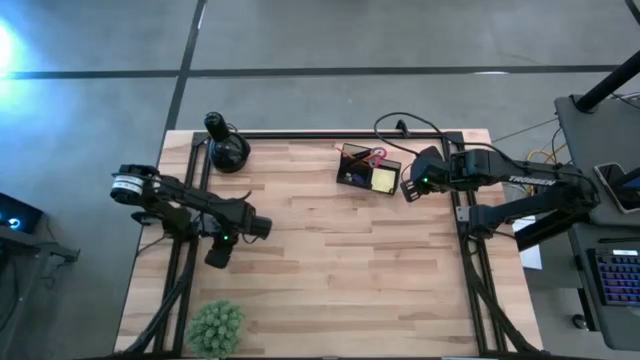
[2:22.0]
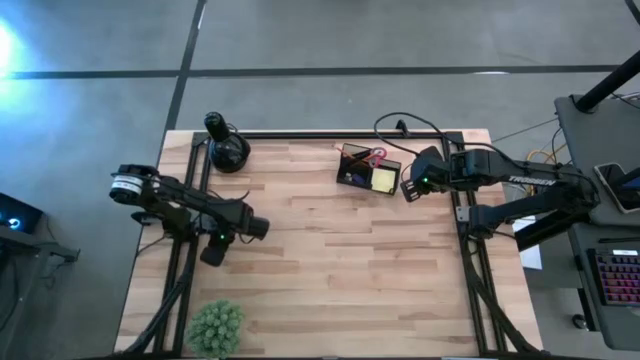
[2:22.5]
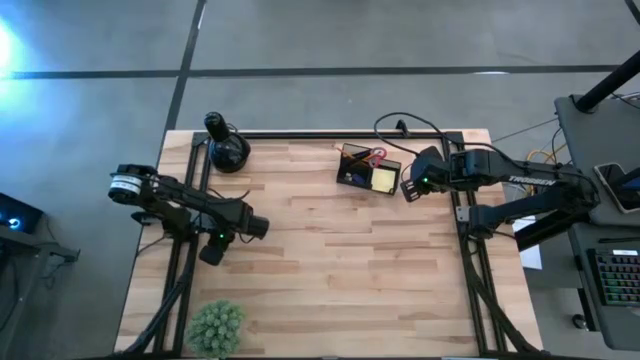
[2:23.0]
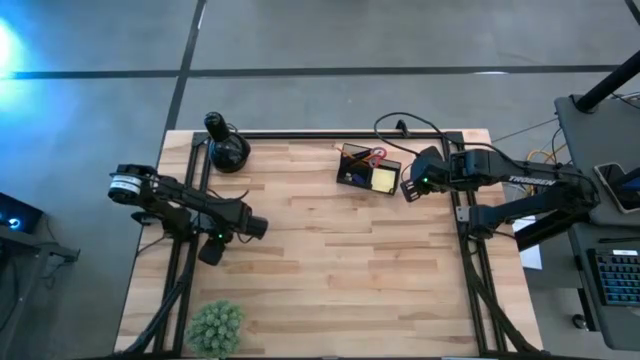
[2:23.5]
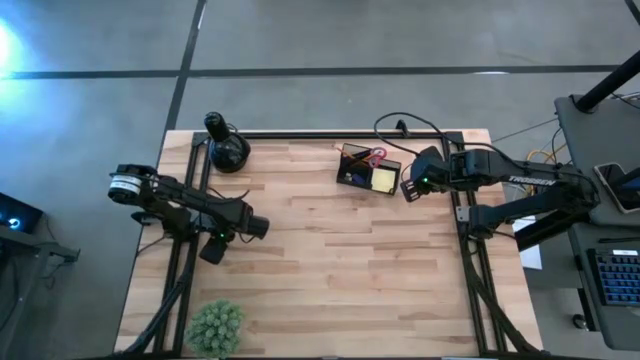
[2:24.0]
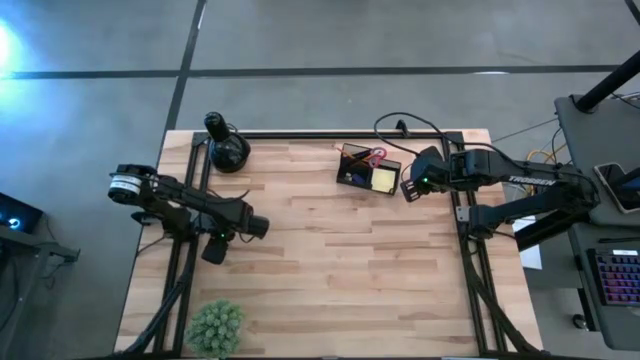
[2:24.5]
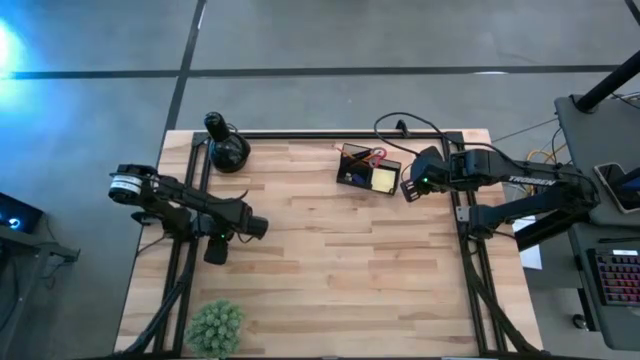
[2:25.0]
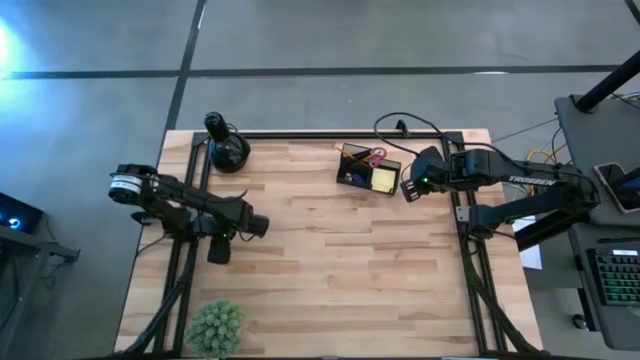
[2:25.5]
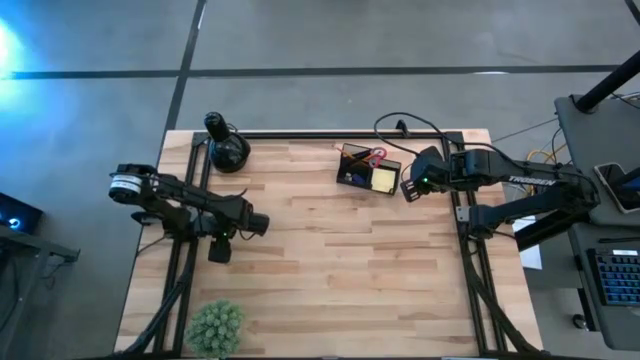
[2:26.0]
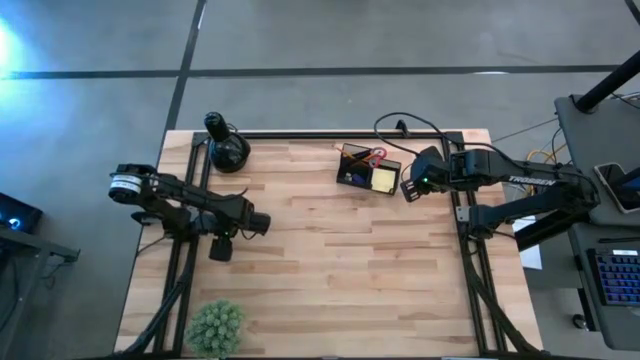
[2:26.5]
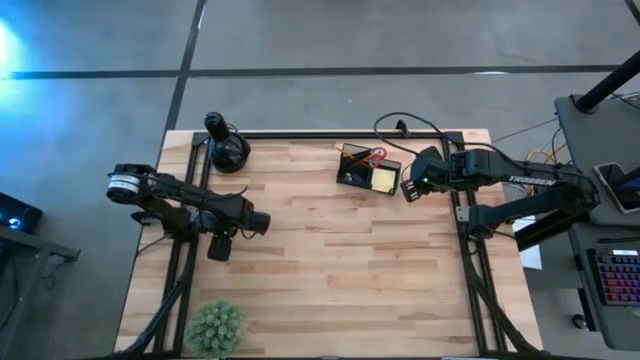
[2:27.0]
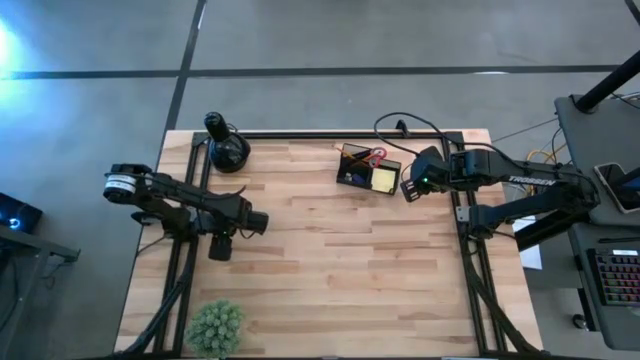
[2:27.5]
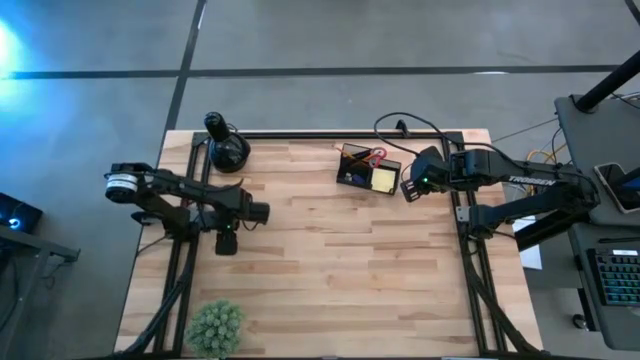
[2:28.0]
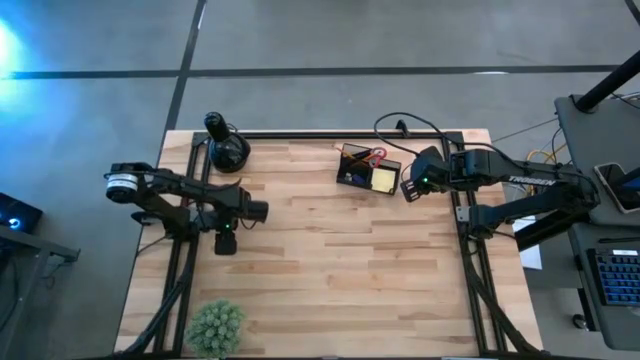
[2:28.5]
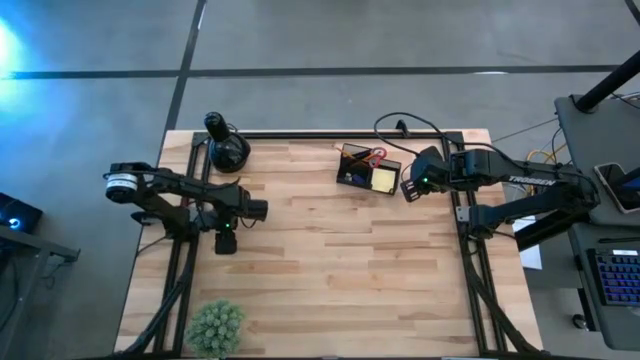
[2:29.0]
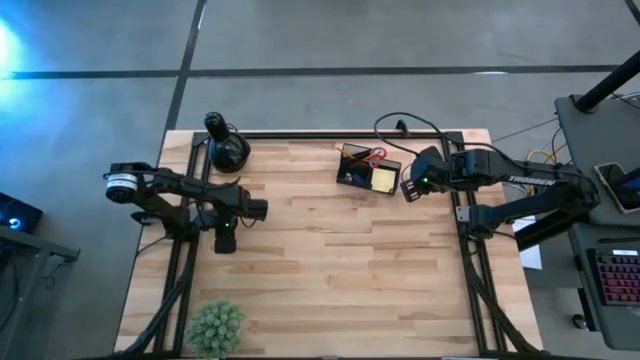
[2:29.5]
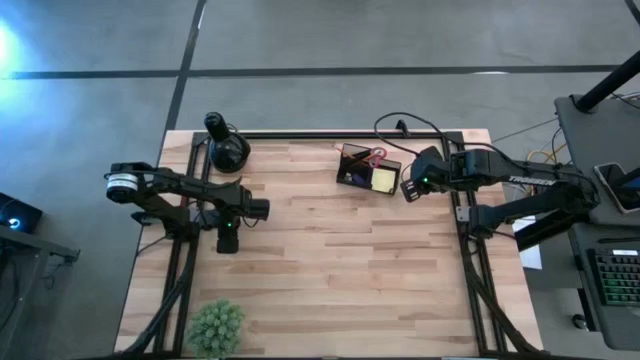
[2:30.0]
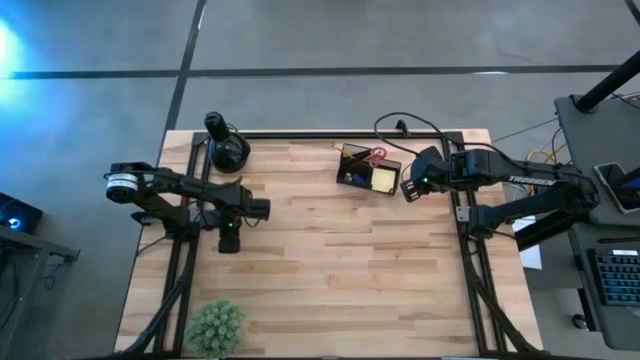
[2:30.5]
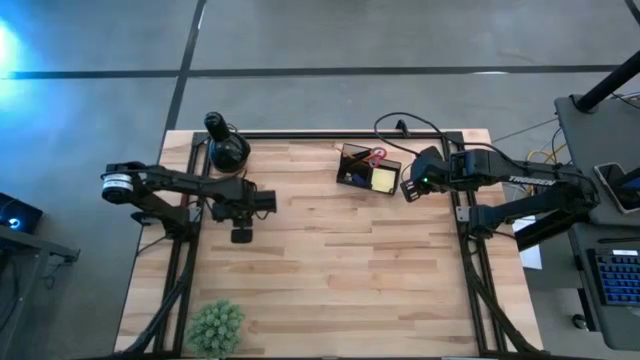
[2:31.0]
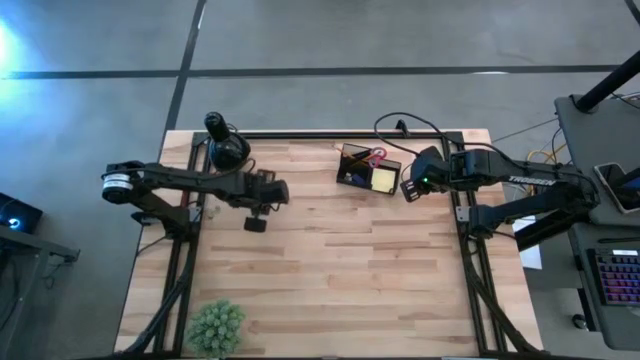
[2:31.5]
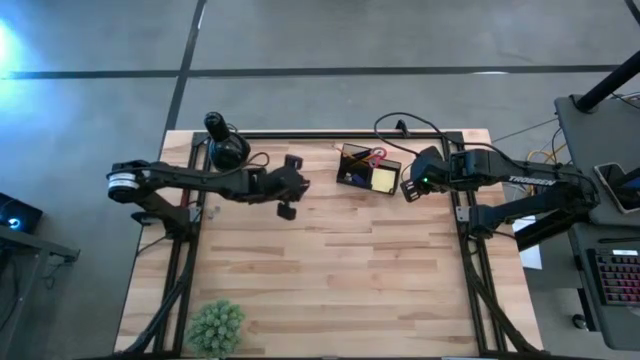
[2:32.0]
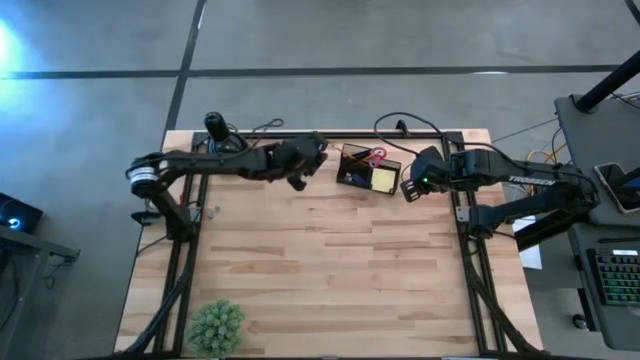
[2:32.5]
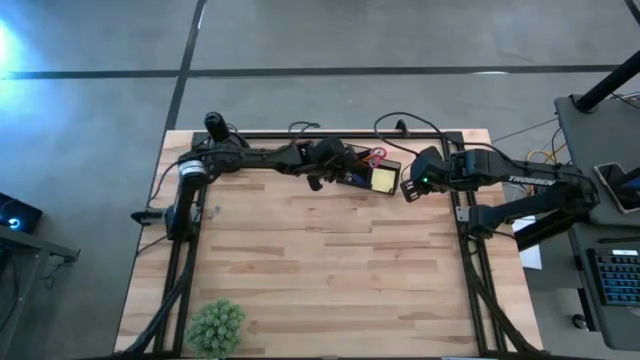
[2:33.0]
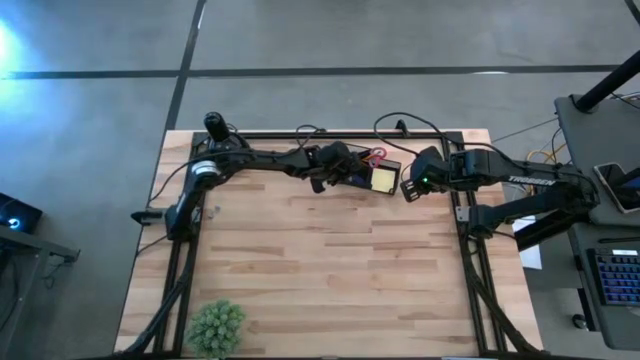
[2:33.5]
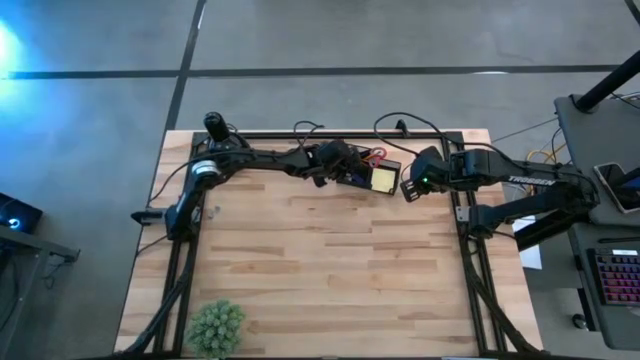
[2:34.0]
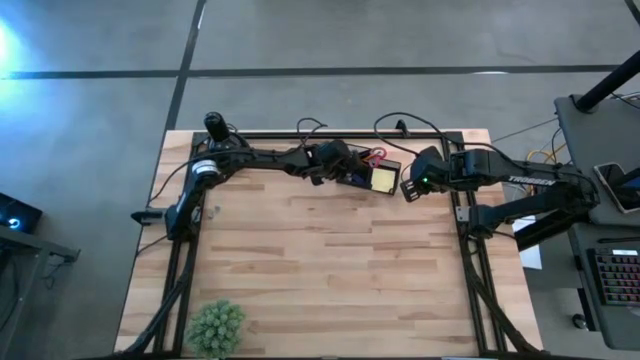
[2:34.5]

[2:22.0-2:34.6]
Task: Pick and place office supplies into organizer
Put the pink binder clip into the desk organizer

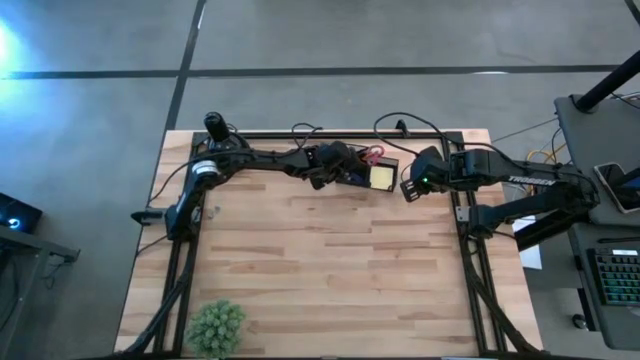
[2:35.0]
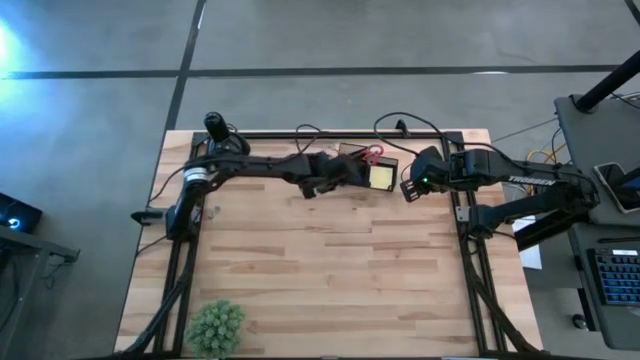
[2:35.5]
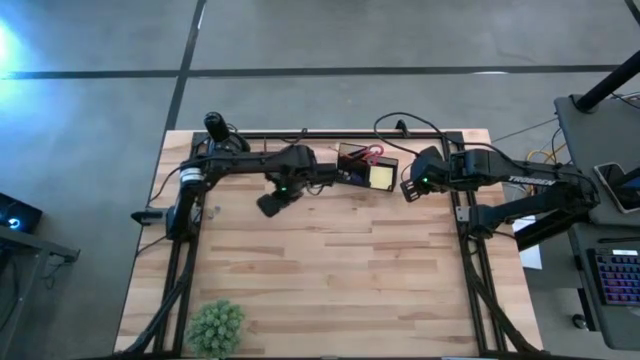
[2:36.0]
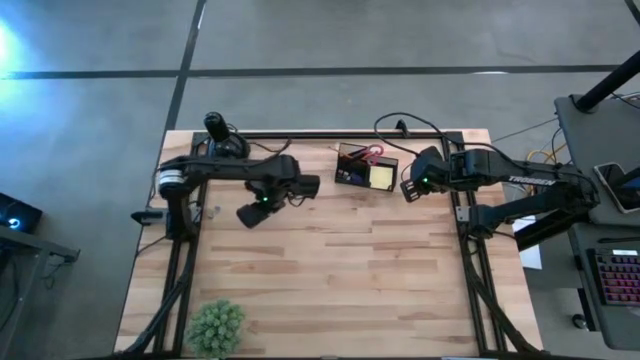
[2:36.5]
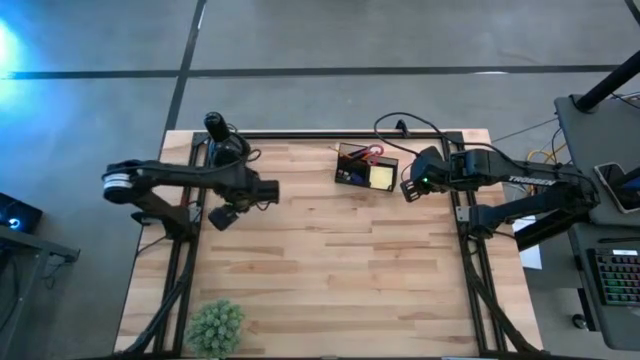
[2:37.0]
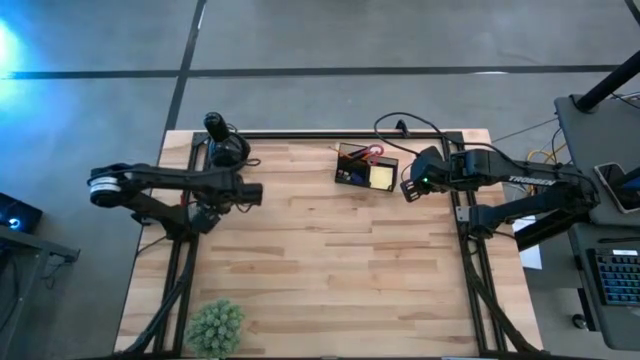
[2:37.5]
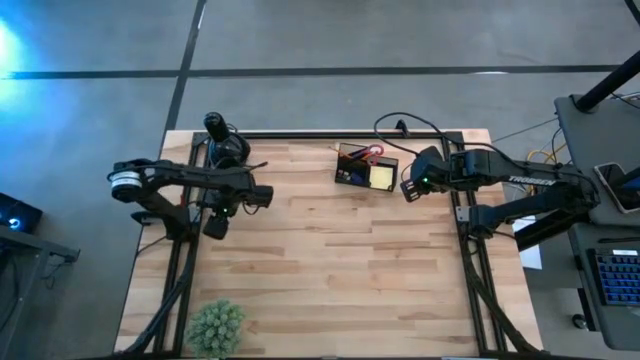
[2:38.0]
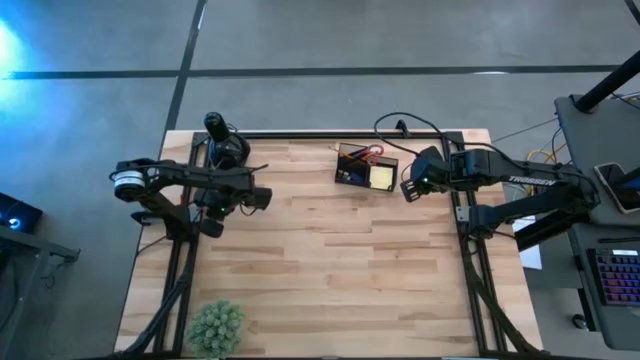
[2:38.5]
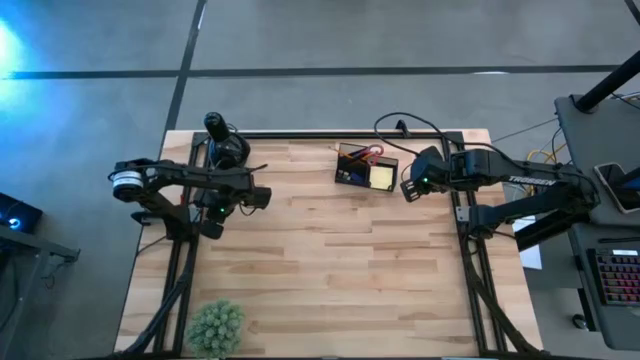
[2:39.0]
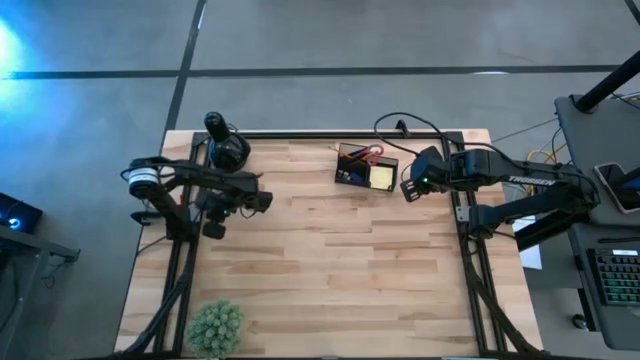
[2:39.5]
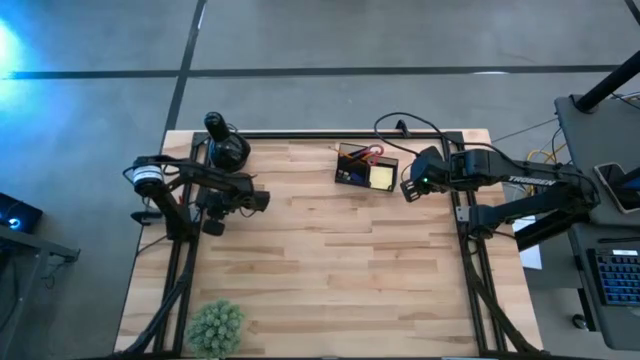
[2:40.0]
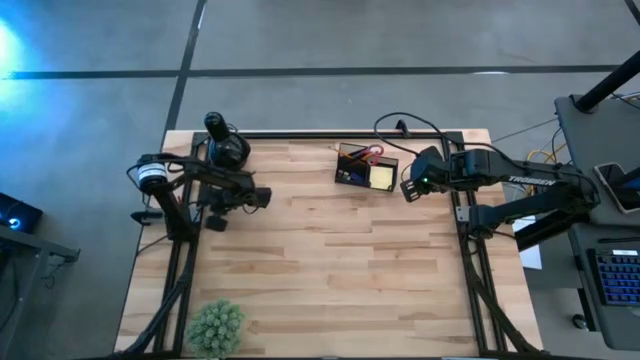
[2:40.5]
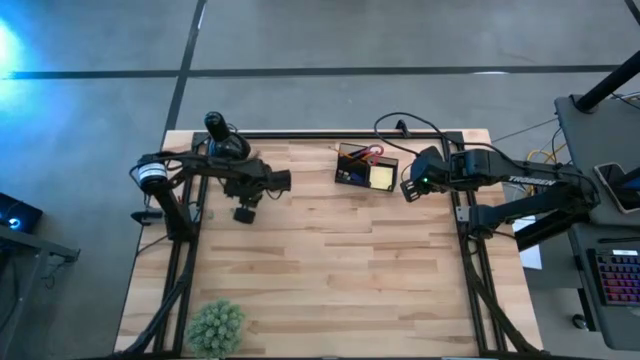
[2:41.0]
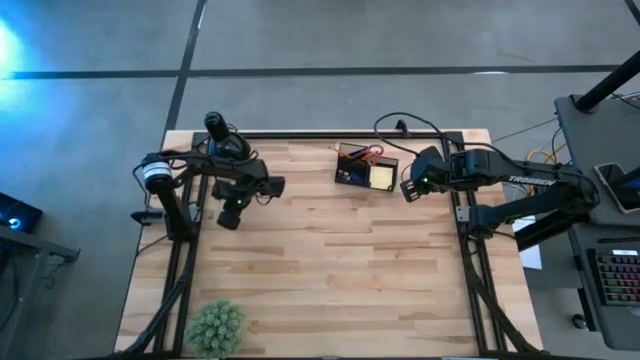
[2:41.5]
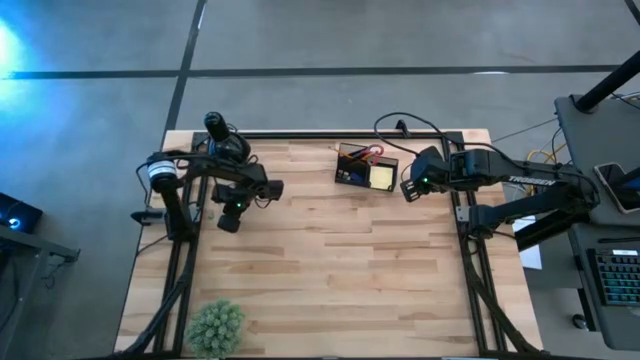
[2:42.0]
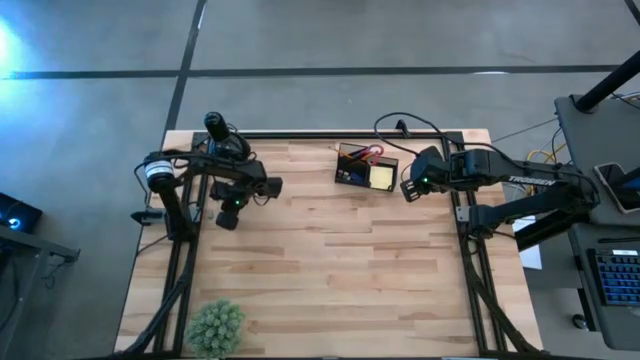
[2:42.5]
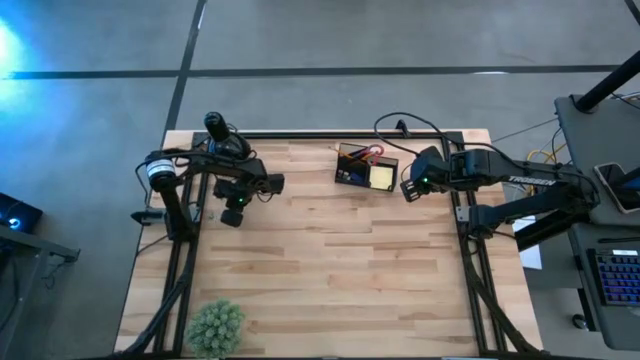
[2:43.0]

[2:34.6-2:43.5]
Move the top blue binder clip toward the right side of the table

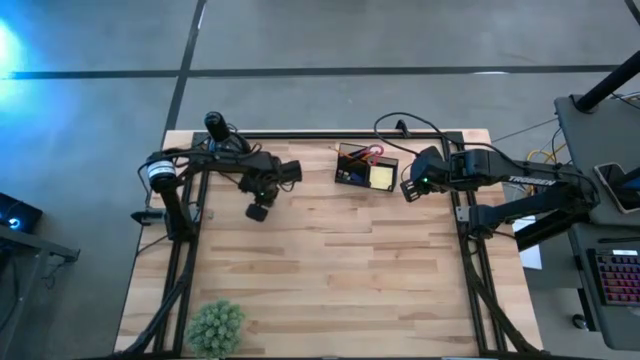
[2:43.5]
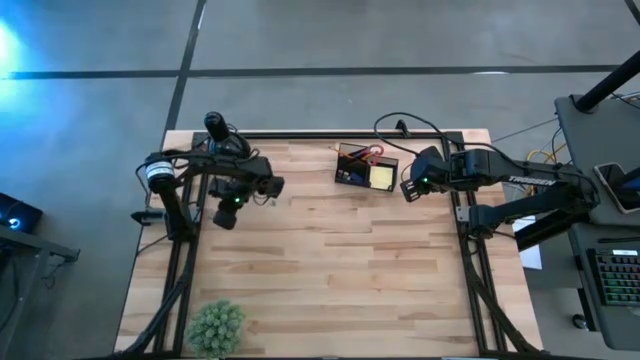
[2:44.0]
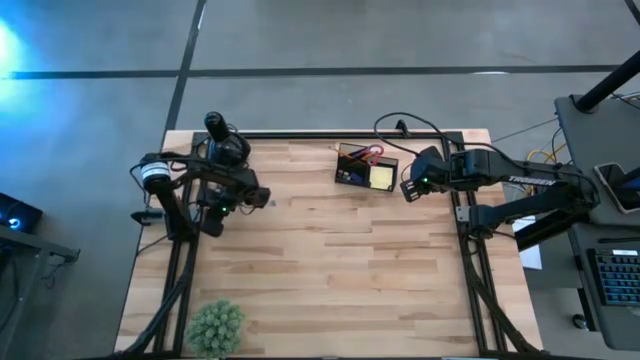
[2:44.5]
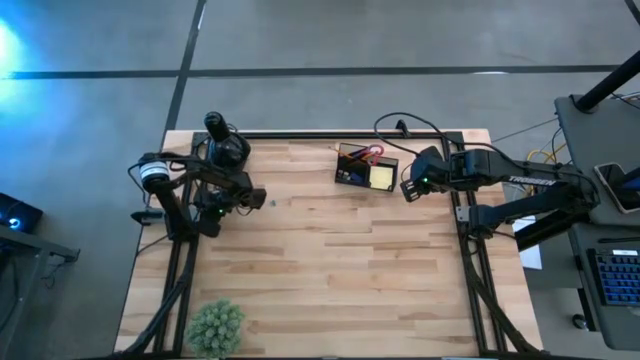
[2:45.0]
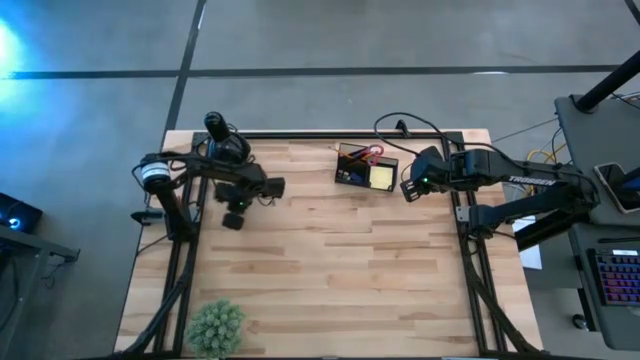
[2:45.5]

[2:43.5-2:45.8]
Move the left blue binder clip toward the right side of the table
